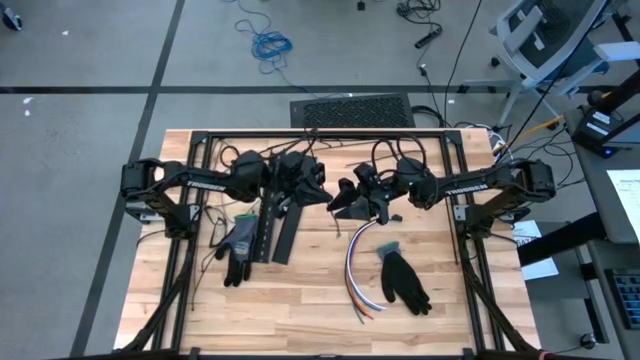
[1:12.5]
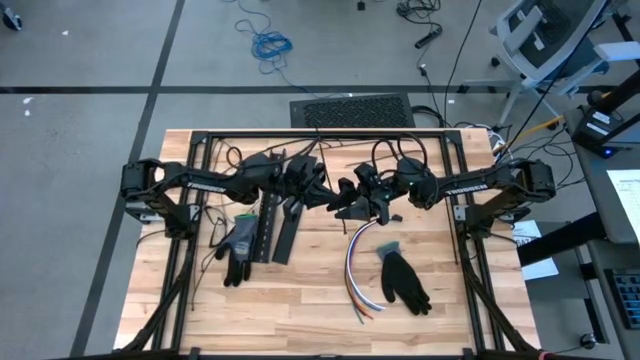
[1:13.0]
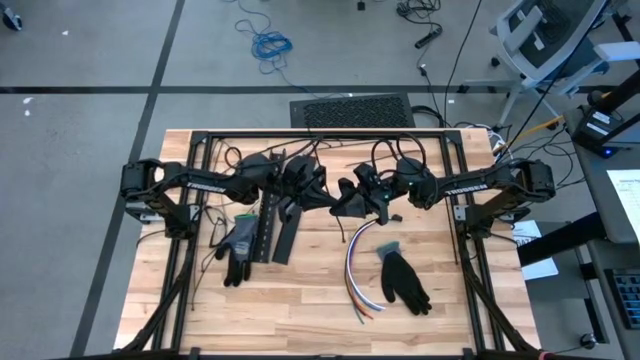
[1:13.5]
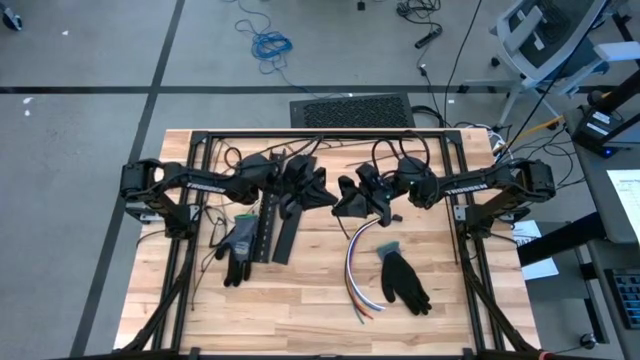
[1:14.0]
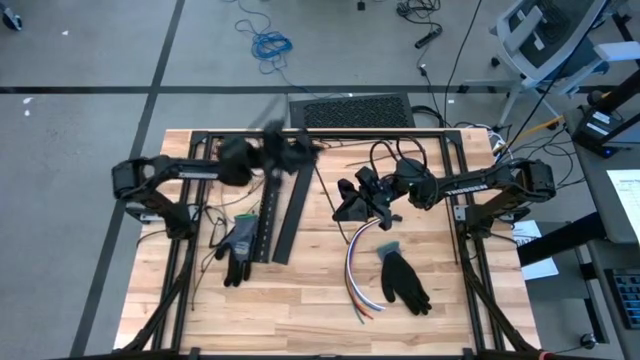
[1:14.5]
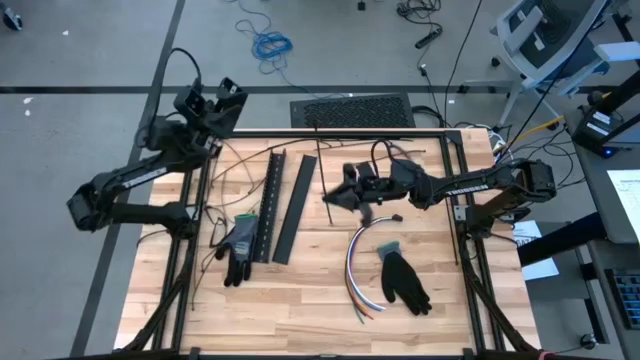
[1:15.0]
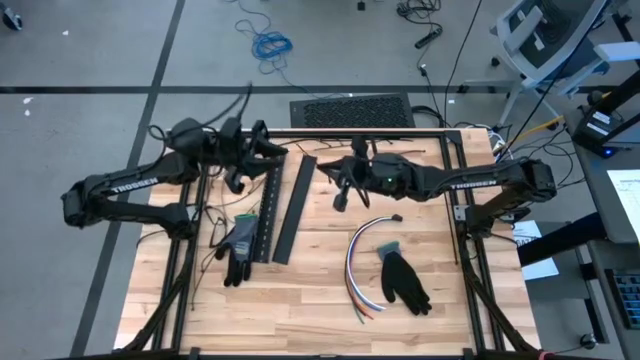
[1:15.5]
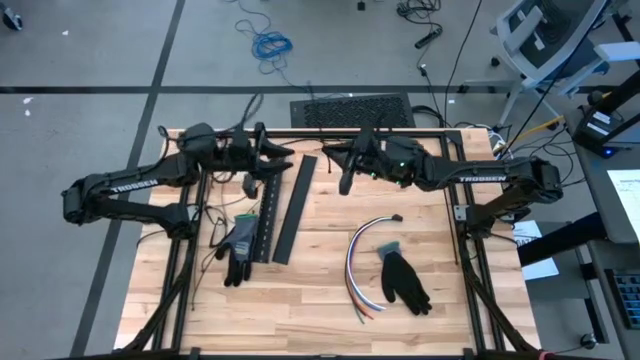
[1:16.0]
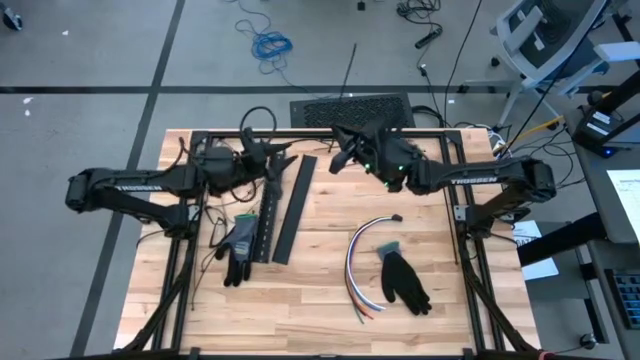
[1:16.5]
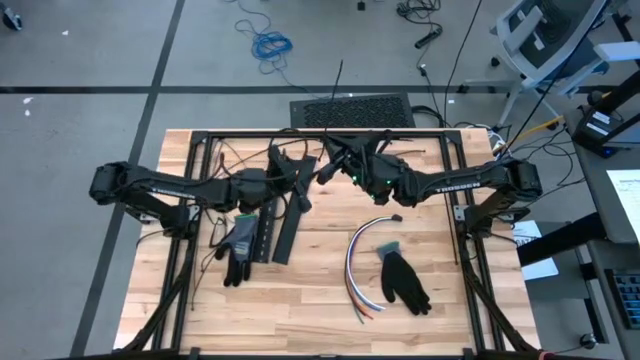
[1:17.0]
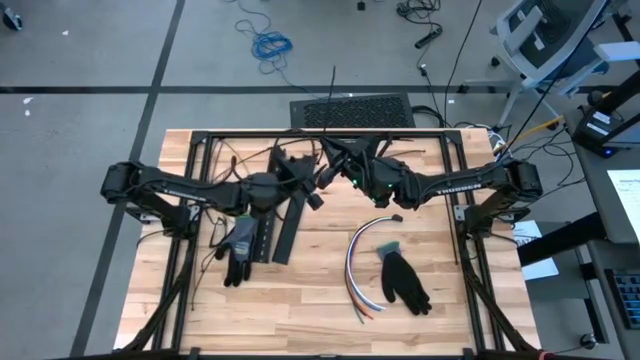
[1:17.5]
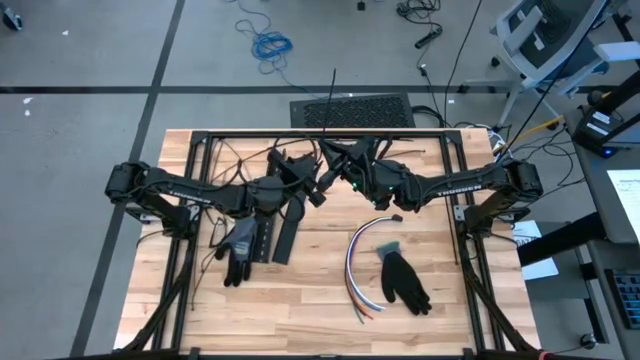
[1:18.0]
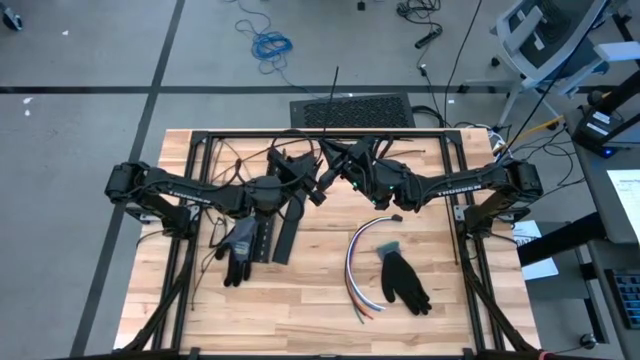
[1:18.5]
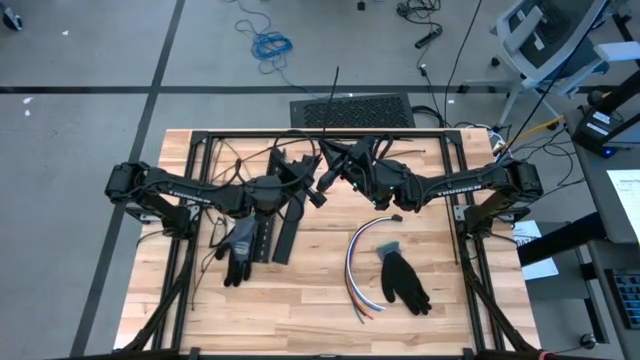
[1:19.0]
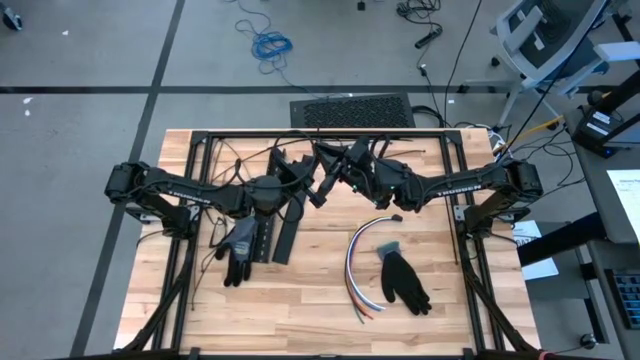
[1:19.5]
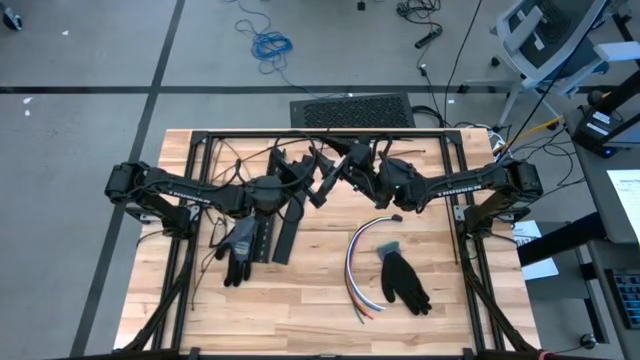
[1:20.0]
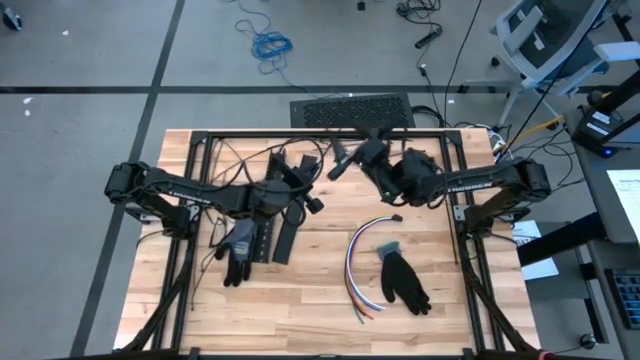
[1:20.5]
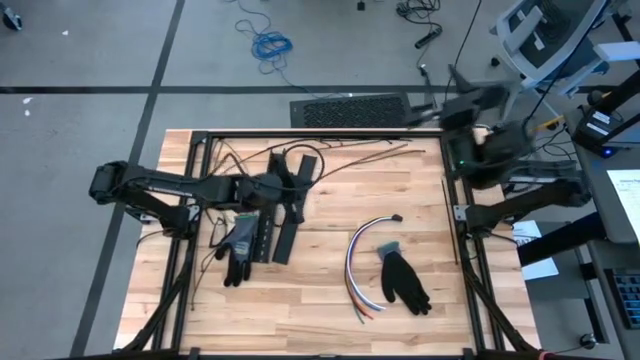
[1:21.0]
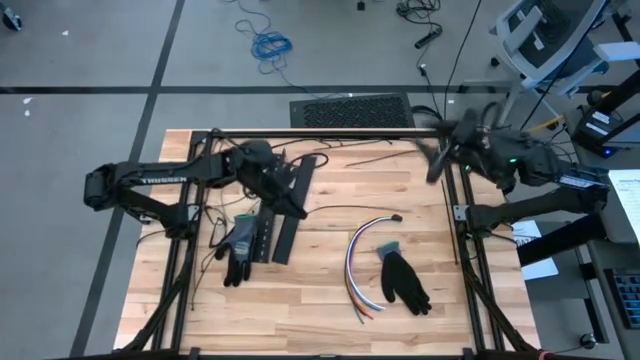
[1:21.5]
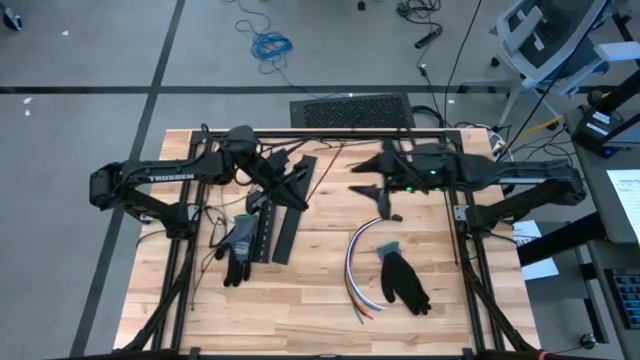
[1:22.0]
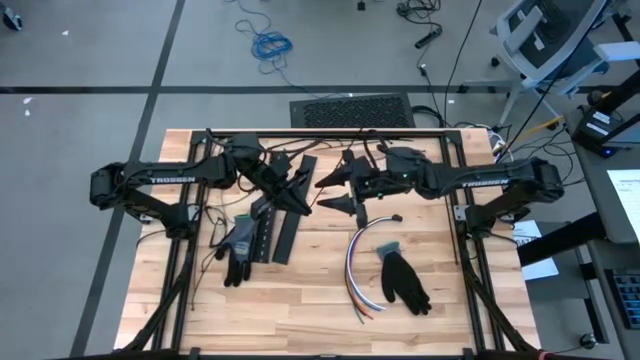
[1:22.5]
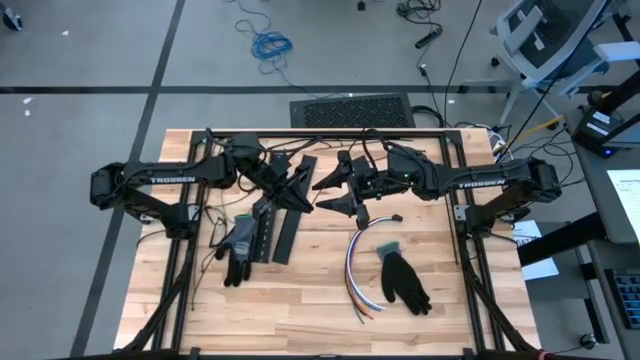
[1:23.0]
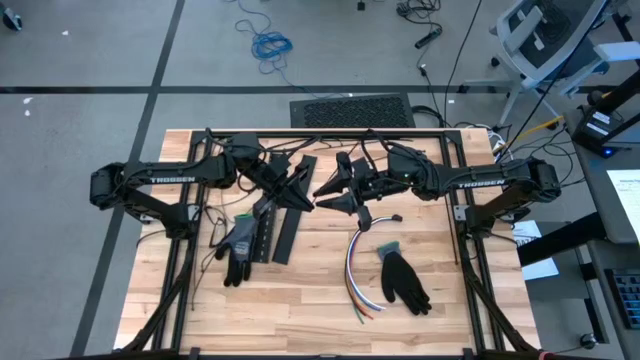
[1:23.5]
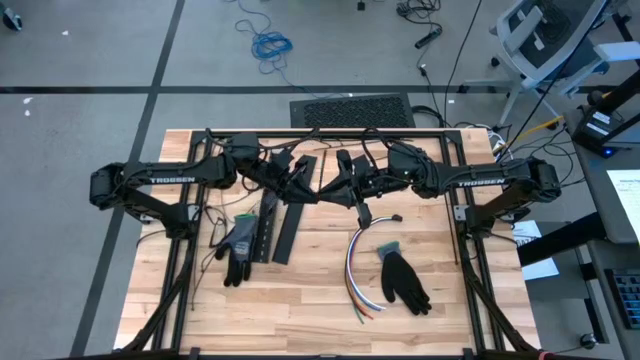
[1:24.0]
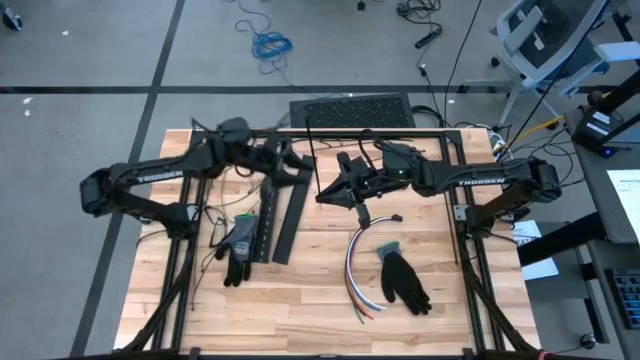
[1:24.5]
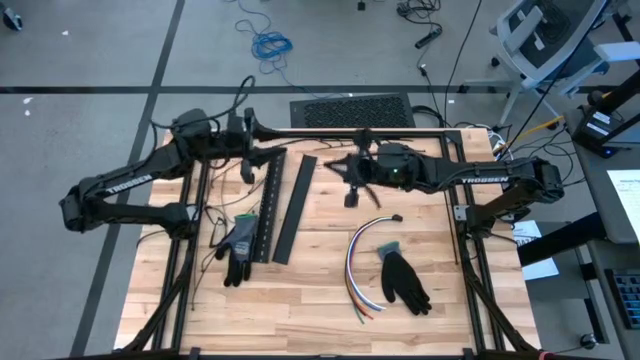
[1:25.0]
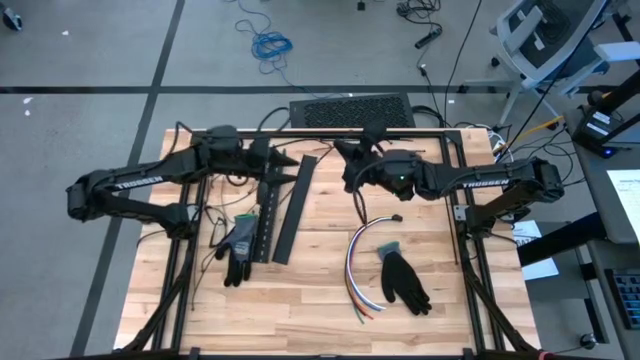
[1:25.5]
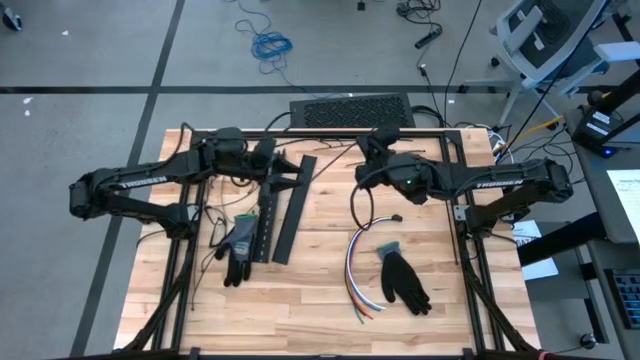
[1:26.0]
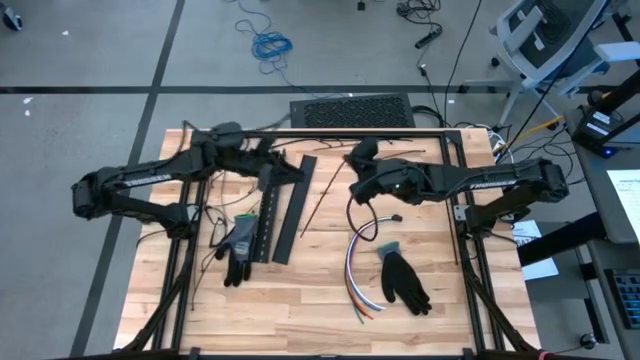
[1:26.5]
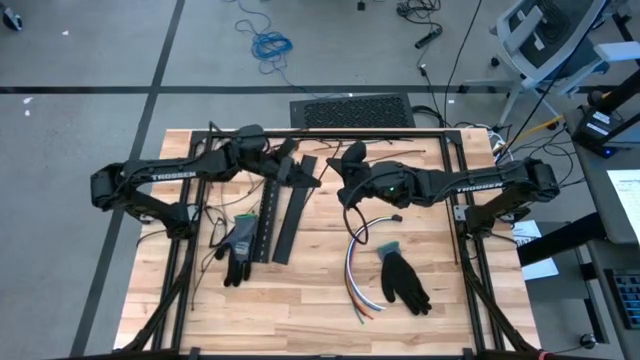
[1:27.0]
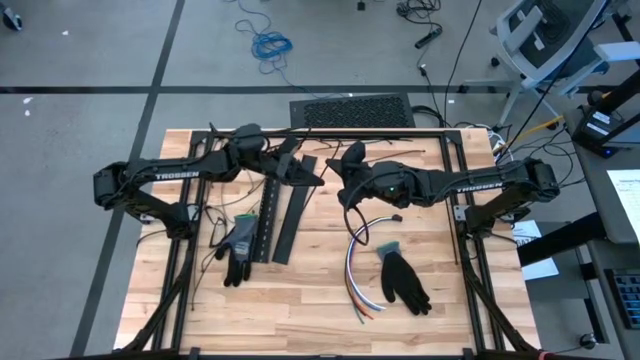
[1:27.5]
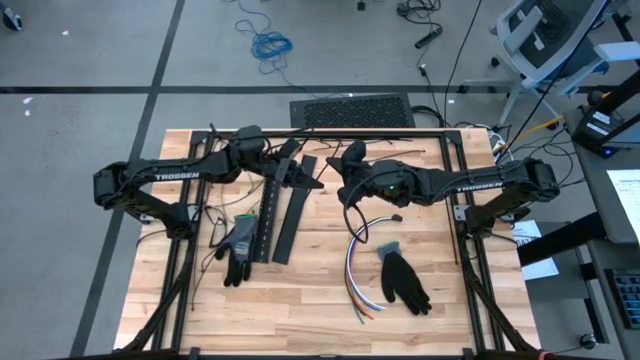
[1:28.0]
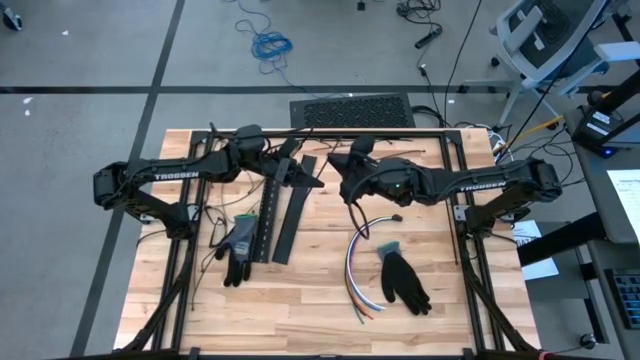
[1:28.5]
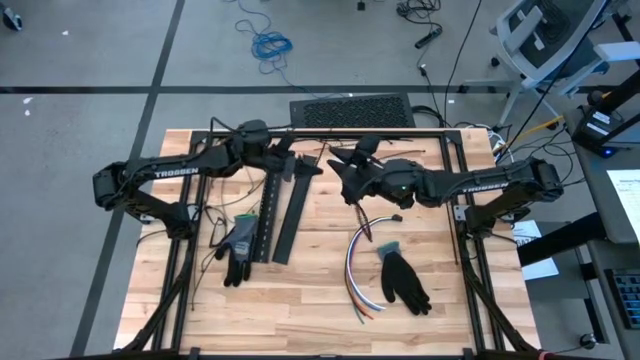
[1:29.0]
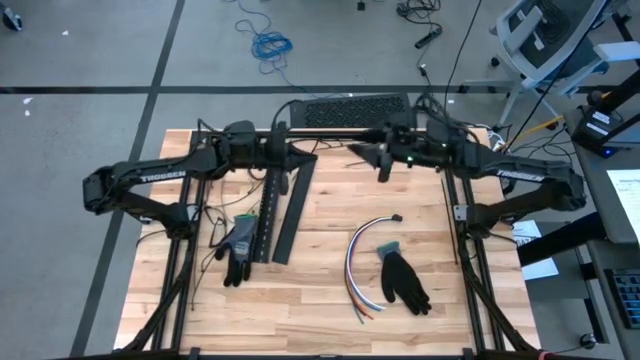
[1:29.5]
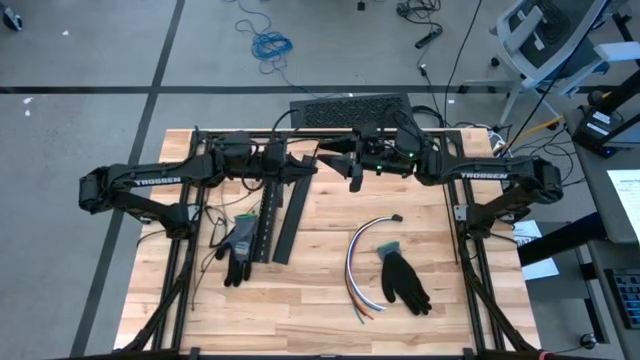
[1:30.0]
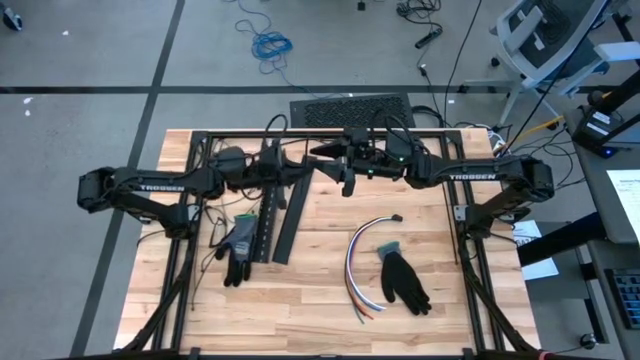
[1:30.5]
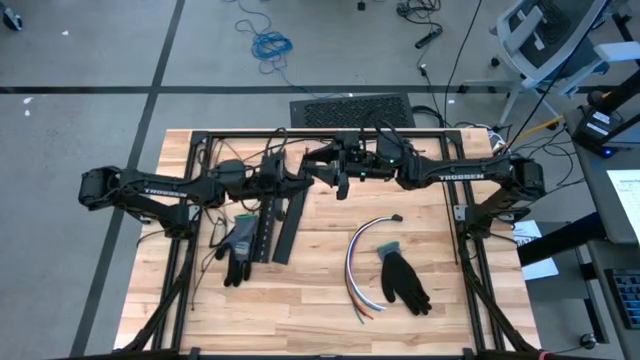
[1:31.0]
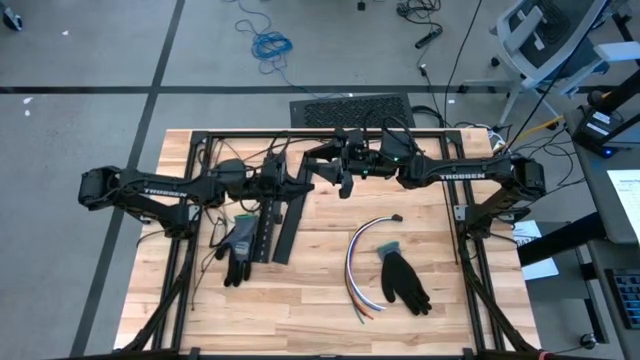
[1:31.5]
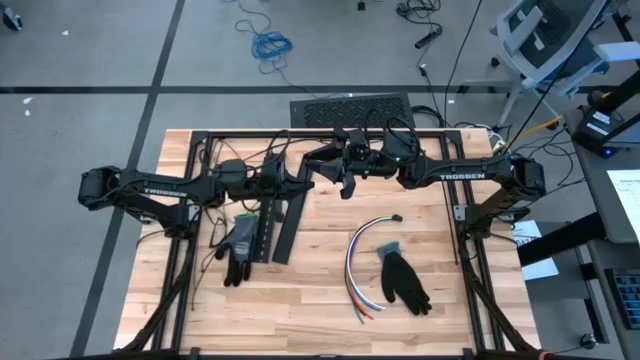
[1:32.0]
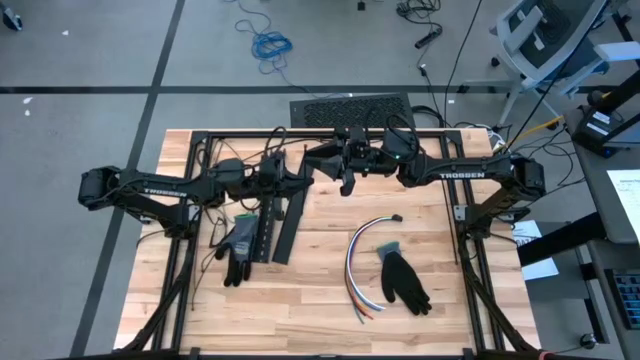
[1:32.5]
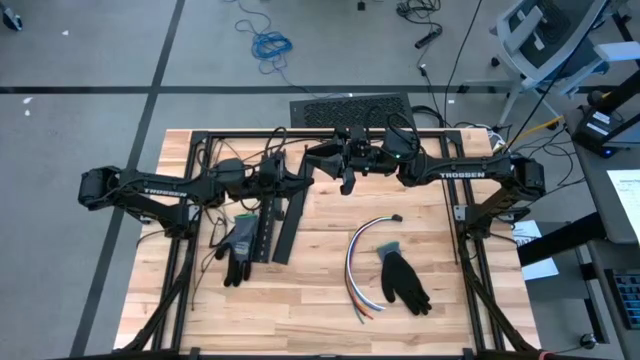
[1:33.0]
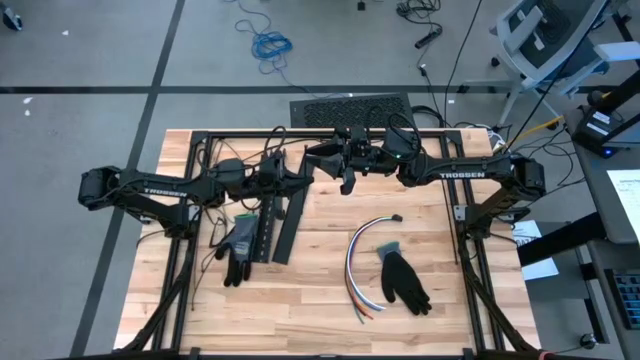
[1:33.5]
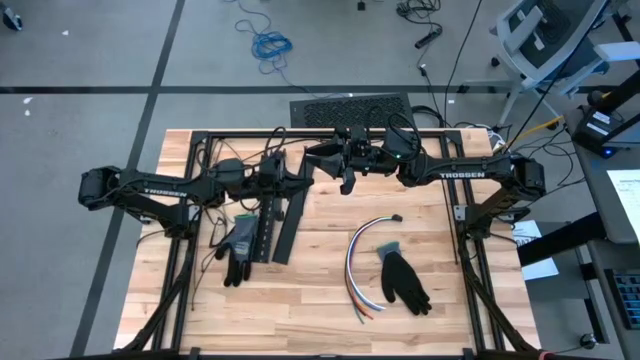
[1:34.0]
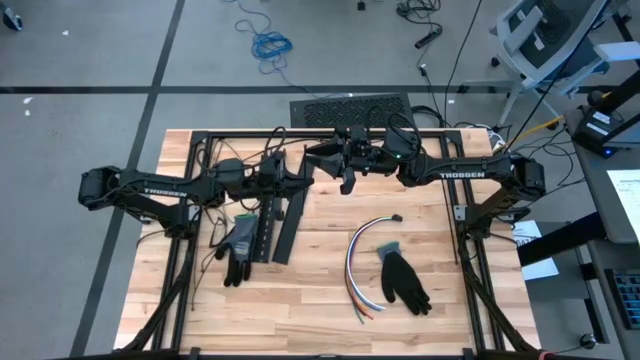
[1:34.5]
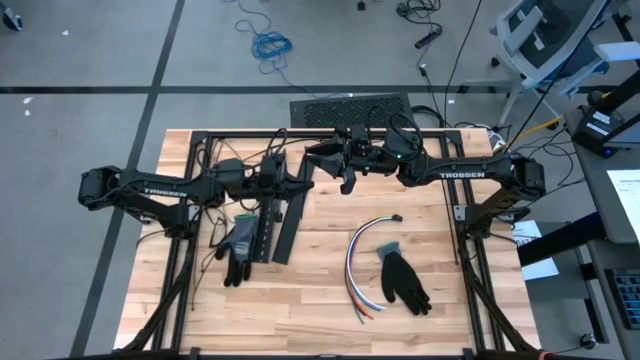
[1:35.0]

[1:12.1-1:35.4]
Task: Ziptie cables
Wrap the cable wires with the black ziptie

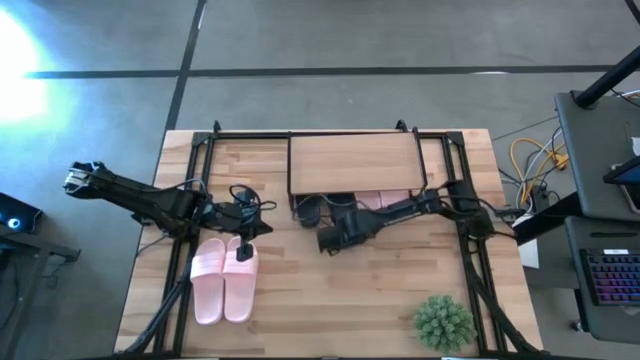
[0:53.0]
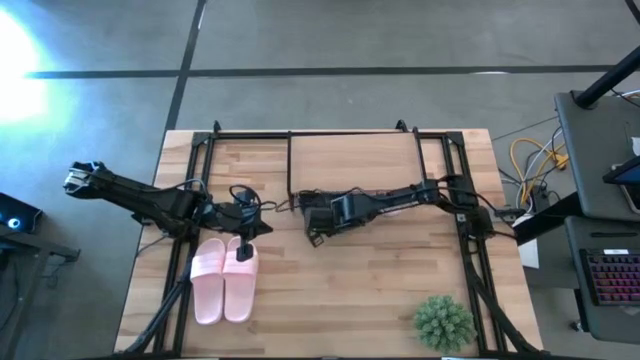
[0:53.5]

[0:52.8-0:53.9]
Task: Pick and place slides into the shelf
Adjust the black slide under the shelf
